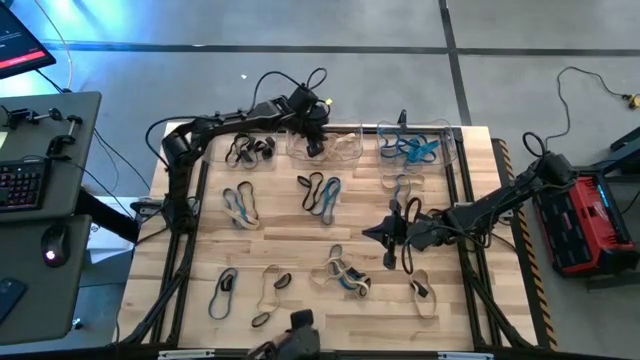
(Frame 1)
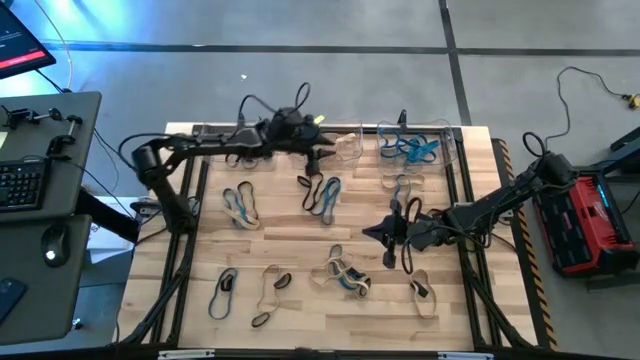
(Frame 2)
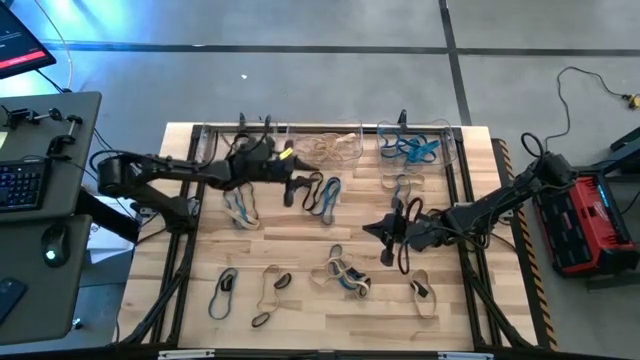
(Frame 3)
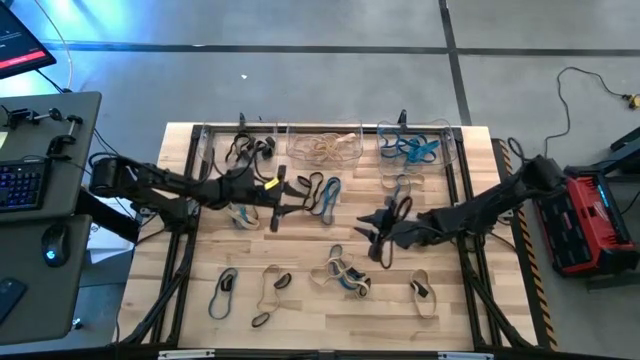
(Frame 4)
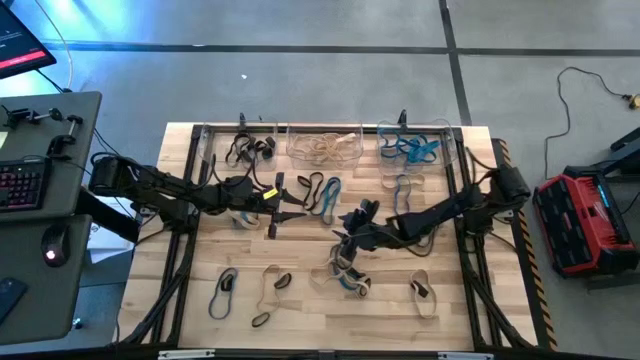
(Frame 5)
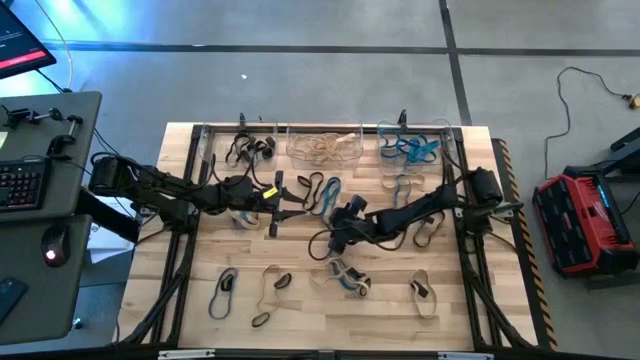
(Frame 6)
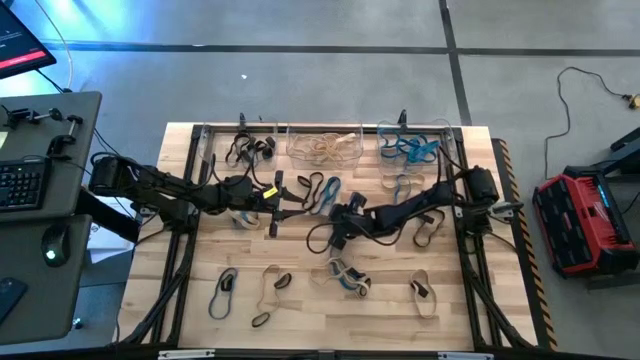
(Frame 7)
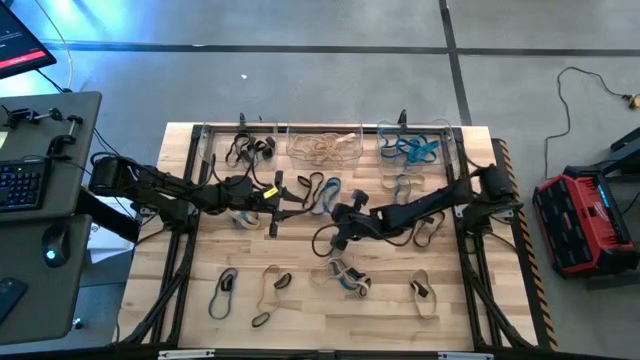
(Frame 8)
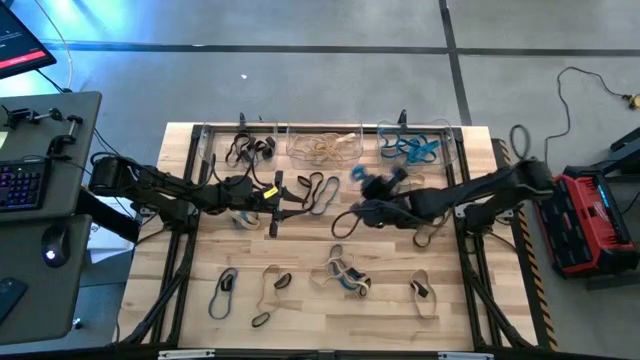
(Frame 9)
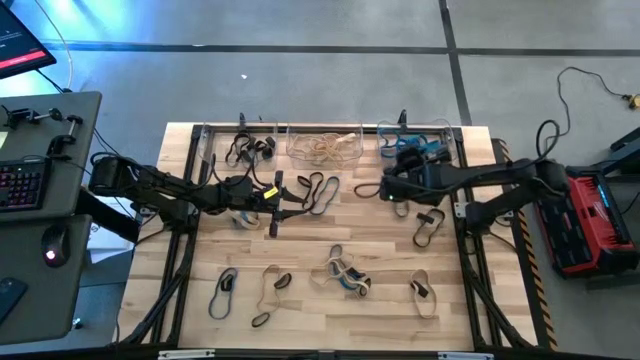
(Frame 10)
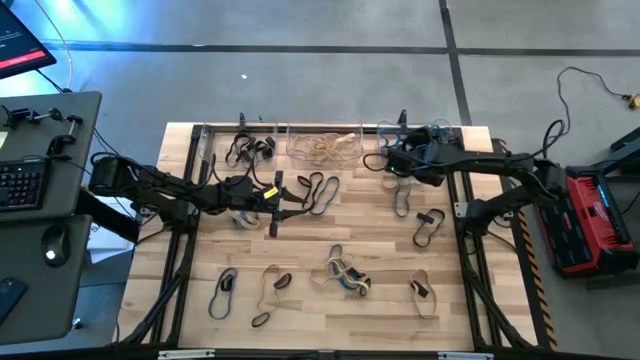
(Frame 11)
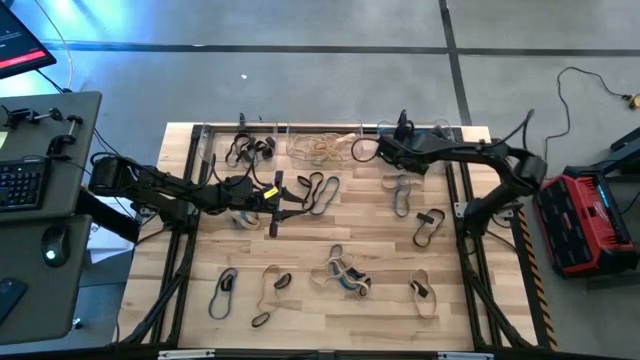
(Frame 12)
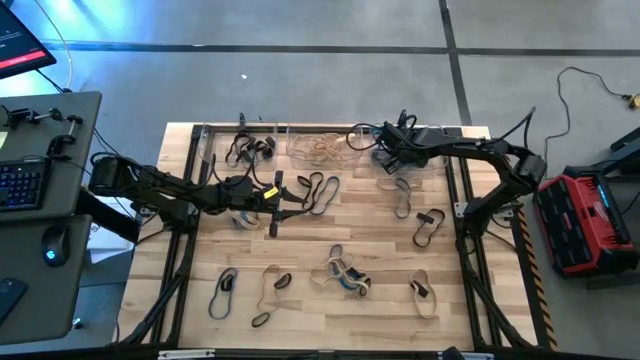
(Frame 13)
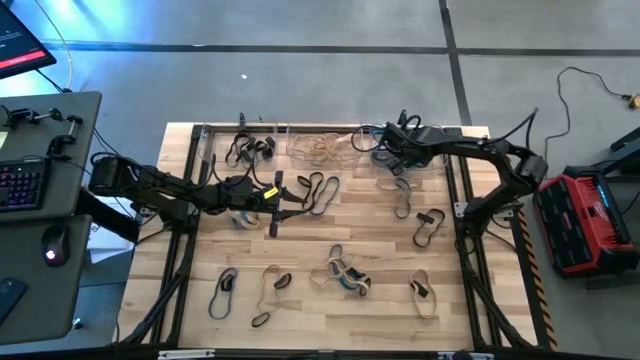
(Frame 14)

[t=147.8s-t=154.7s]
Task: Sort rubber bands into baskets
Put the blue rubber band into the right transparent bin

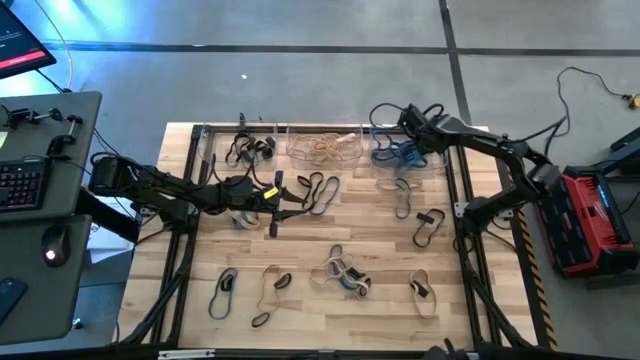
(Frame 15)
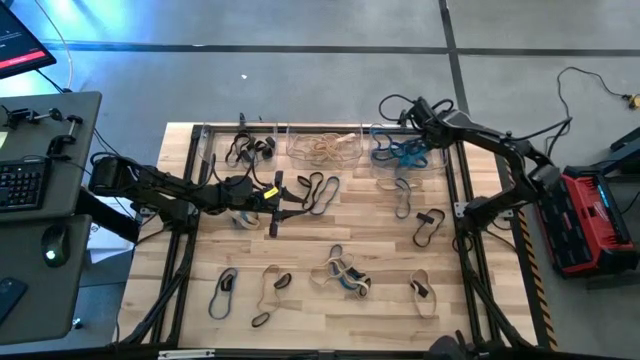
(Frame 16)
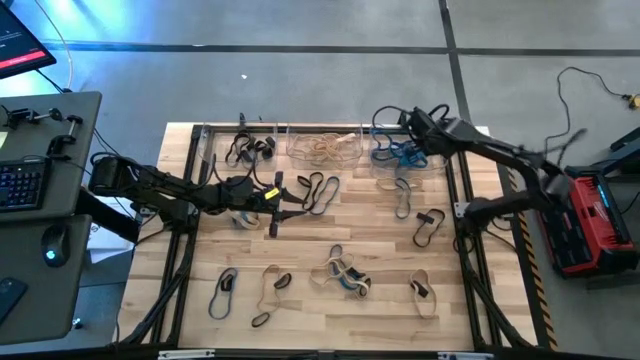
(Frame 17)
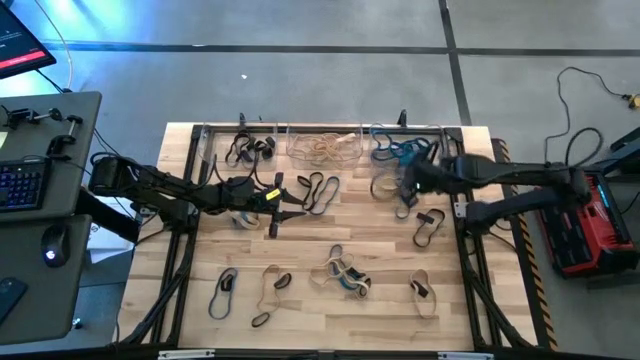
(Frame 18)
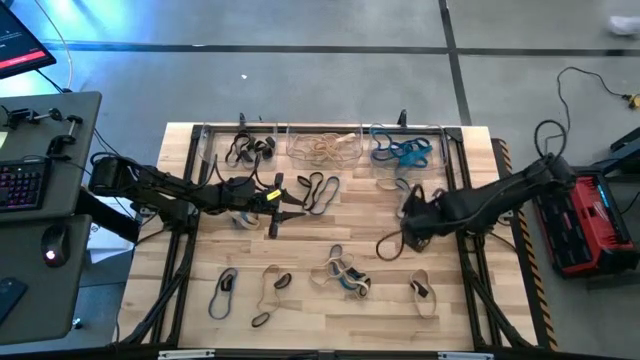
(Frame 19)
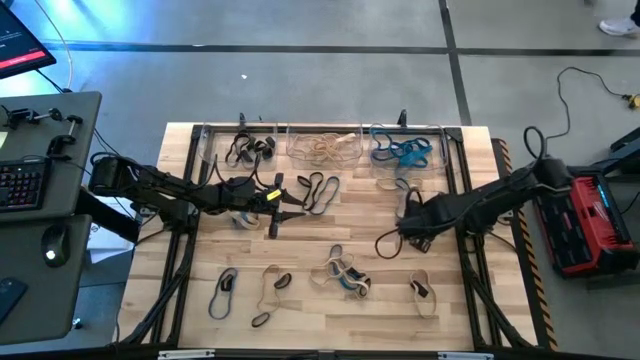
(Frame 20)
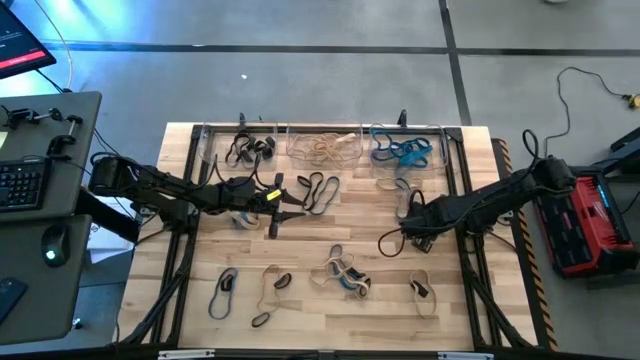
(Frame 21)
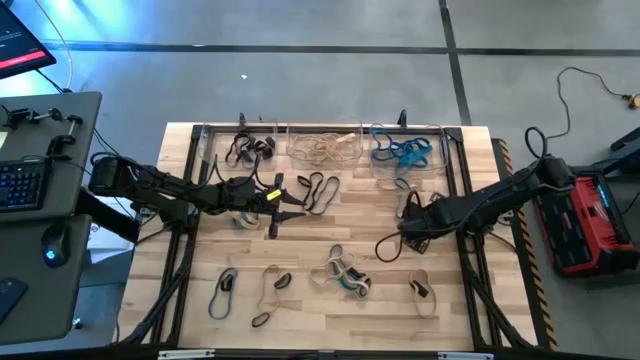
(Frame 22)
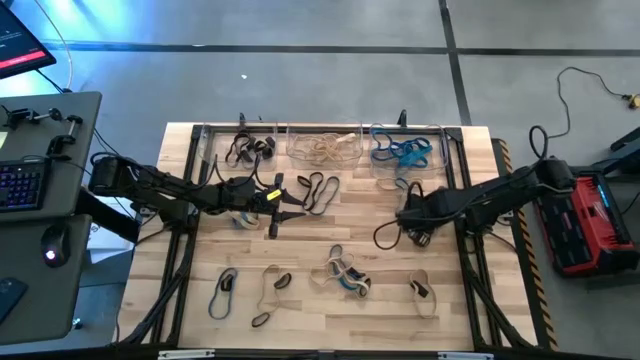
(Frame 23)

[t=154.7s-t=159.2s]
Put the black rubber band into the left transparent bin

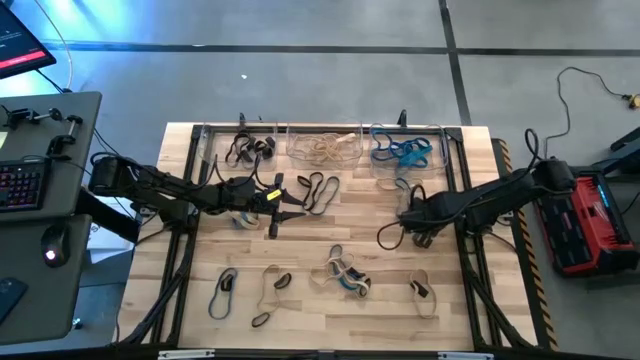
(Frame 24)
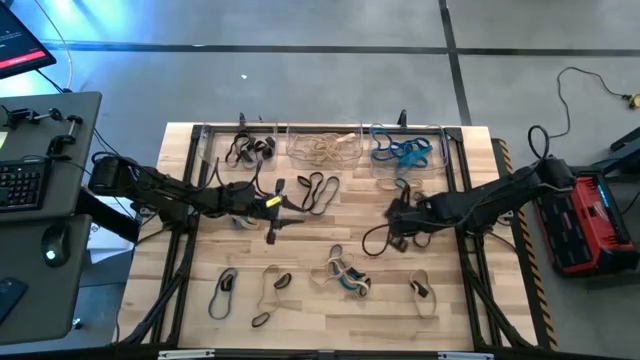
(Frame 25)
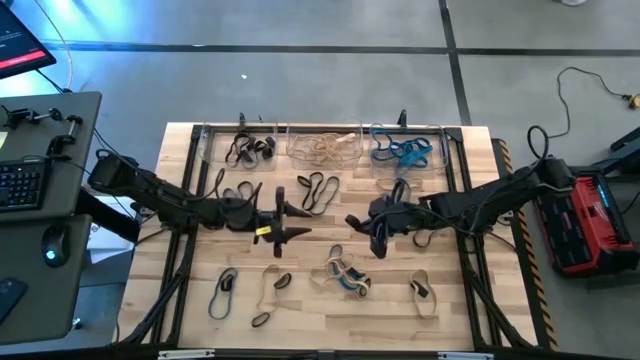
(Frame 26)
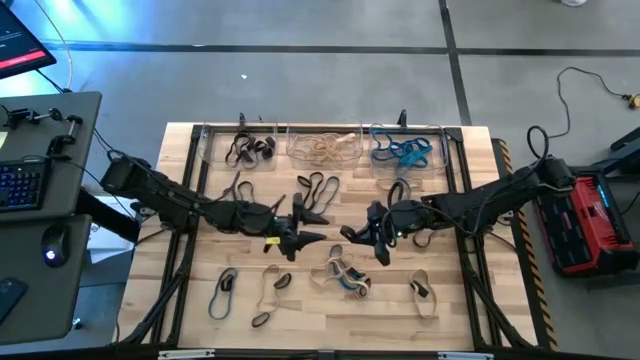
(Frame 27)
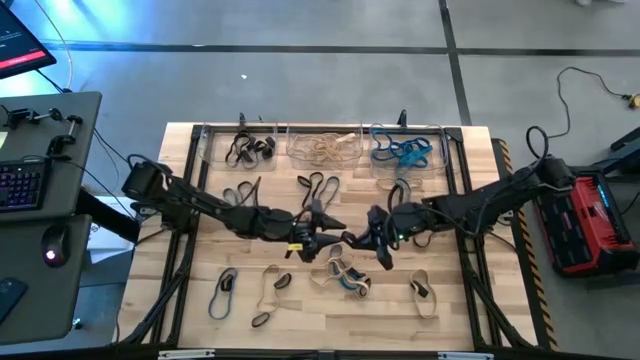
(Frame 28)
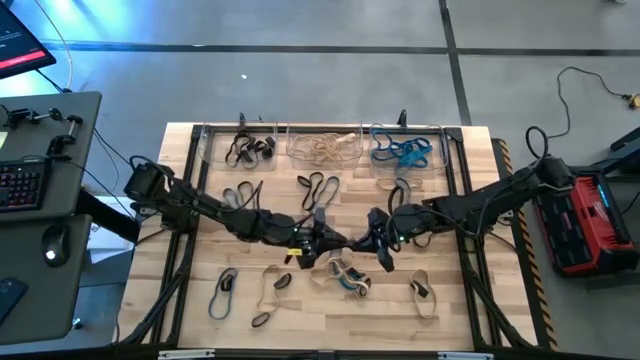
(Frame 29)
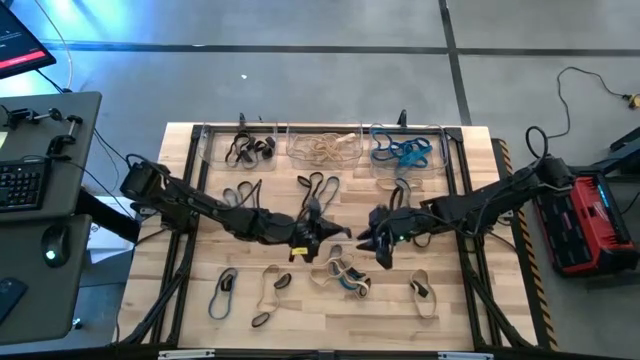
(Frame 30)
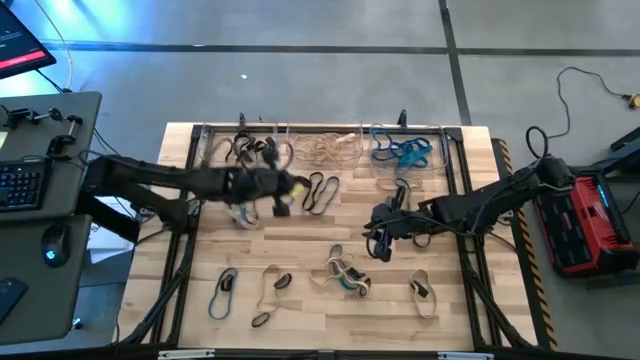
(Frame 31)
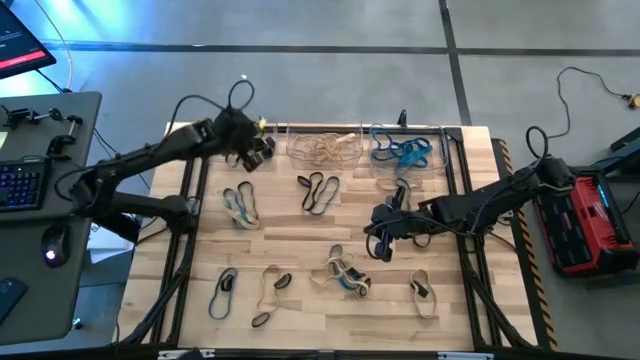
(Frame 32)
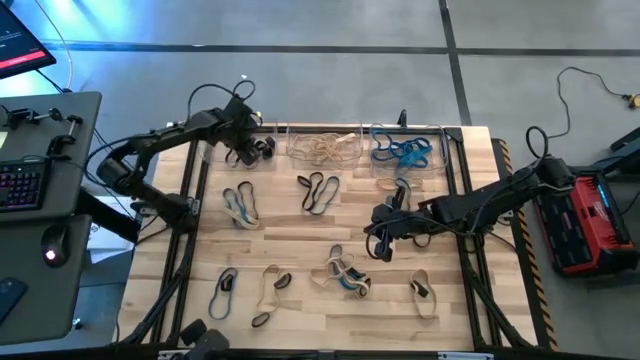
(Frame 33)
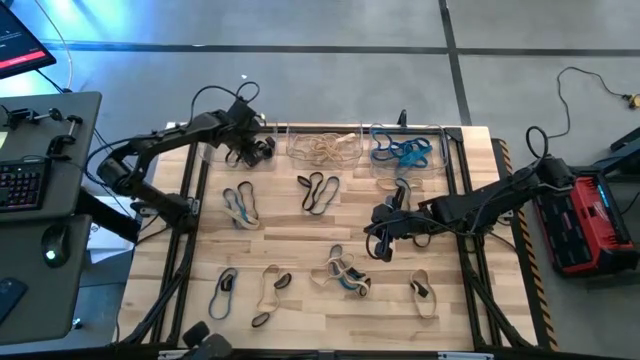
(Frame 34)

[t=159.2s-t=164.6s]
Put the black rubber band into the left transparent bin

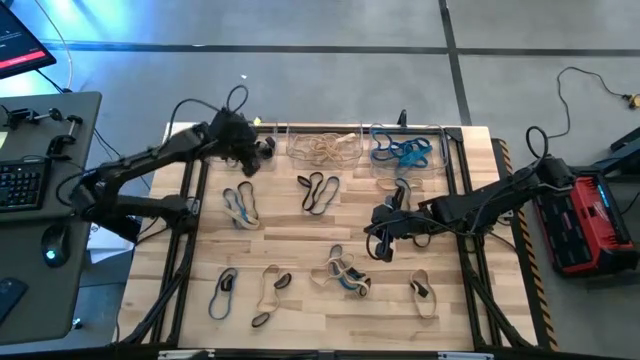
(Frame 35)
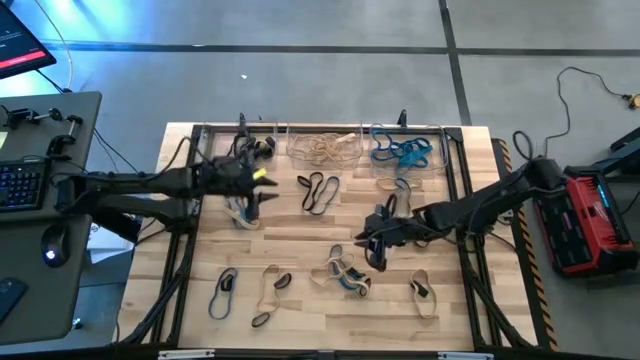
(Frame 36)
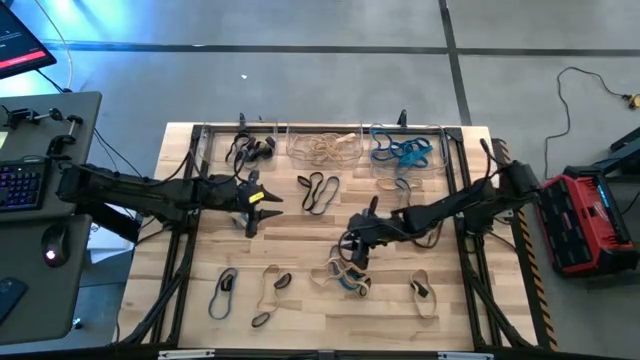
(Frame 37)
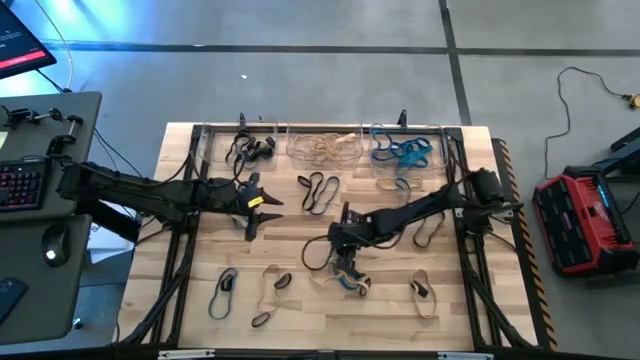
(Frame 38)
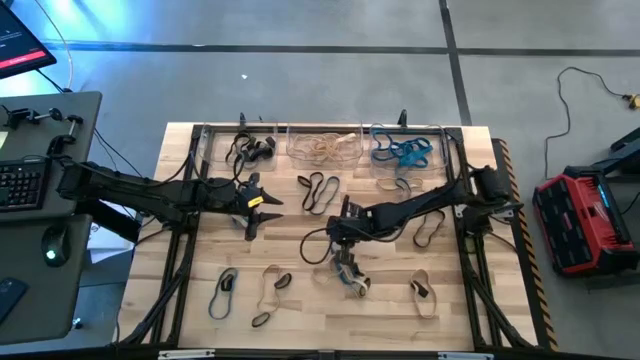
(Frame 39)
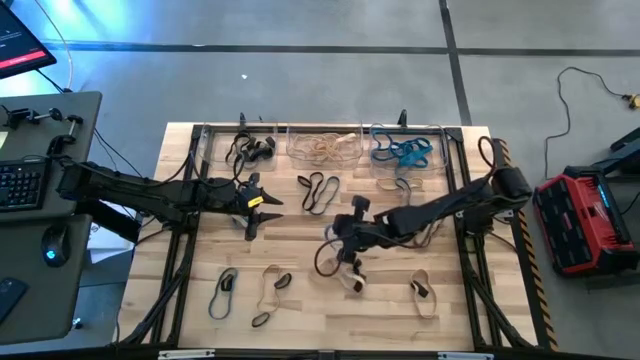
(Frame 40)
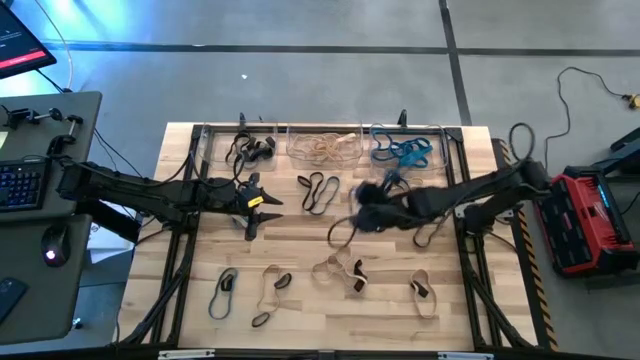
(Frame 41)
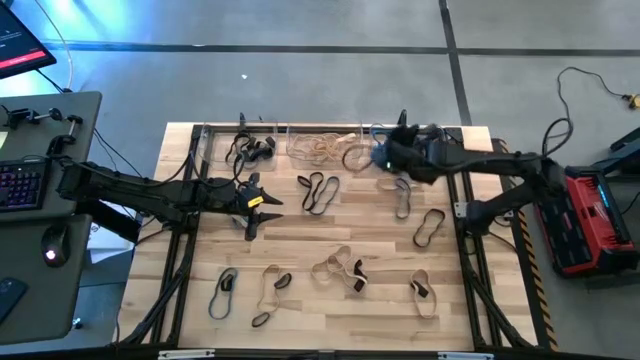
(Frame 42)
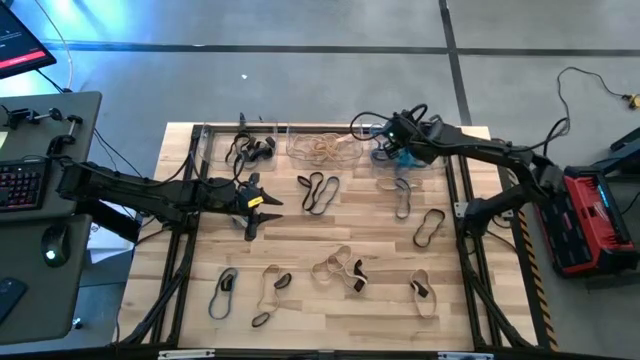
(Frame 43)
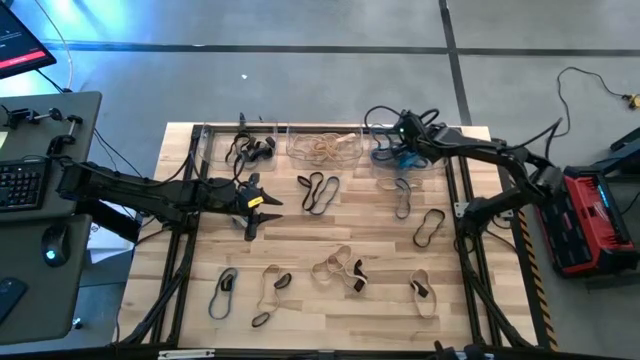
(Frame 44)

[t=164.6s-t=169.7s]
Put the blue rubber band into the right transparent bin
